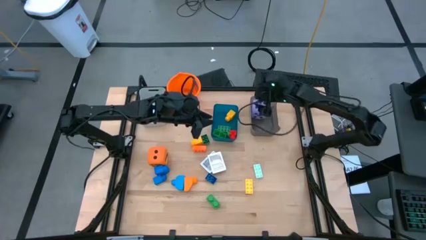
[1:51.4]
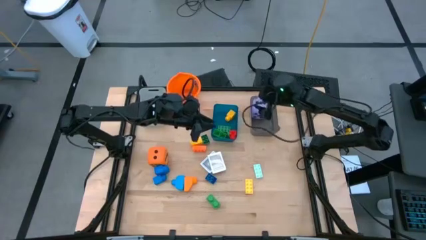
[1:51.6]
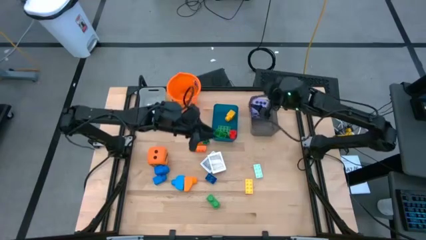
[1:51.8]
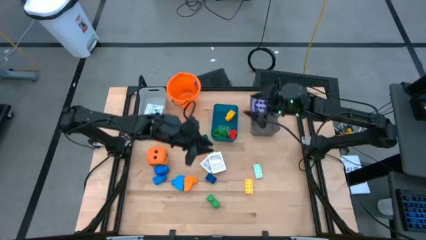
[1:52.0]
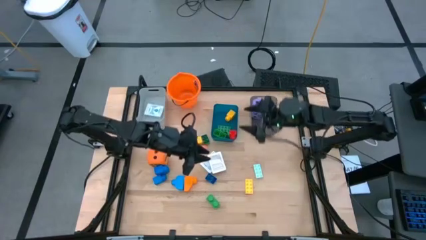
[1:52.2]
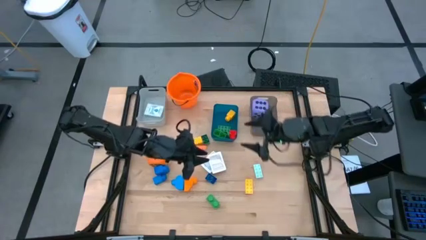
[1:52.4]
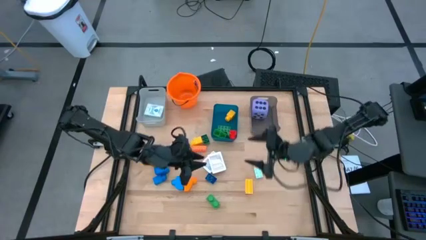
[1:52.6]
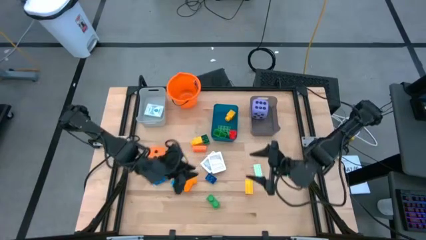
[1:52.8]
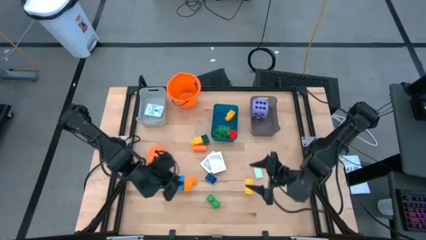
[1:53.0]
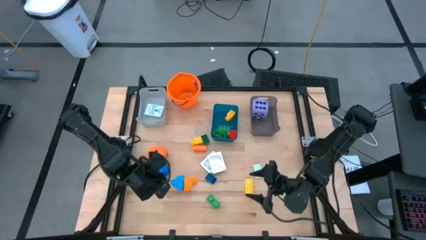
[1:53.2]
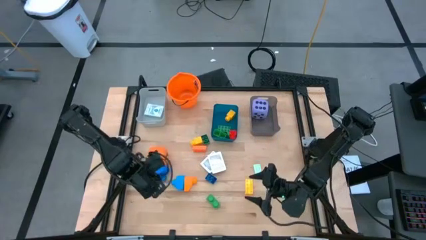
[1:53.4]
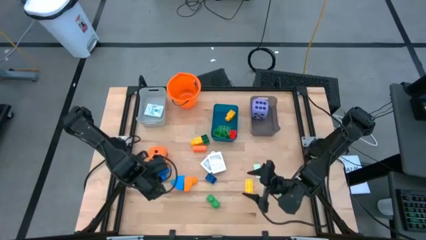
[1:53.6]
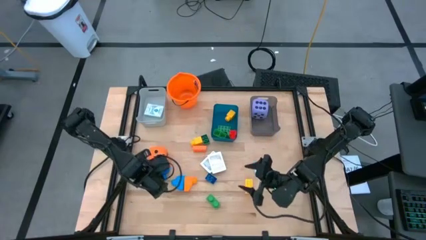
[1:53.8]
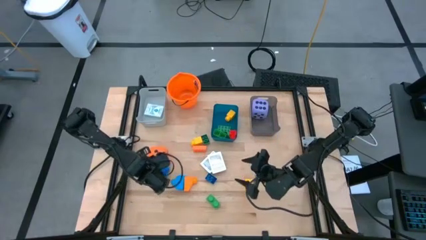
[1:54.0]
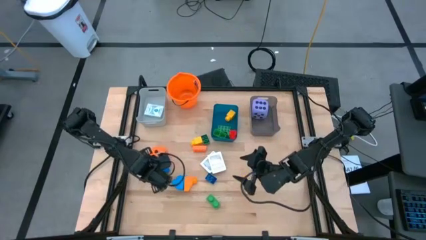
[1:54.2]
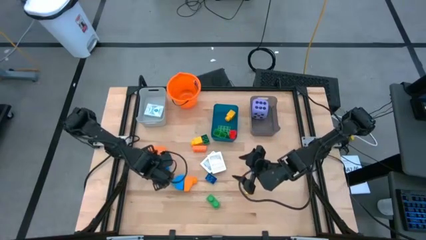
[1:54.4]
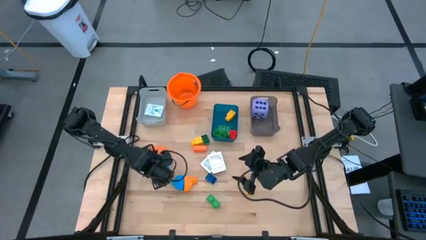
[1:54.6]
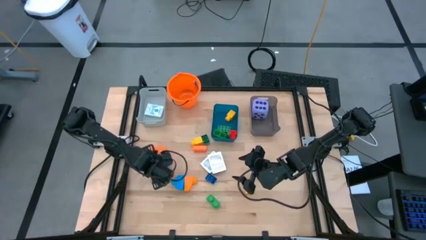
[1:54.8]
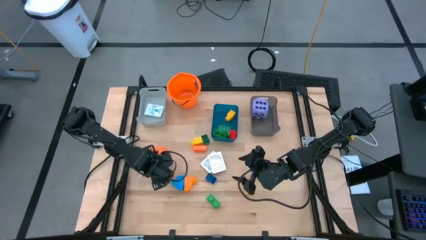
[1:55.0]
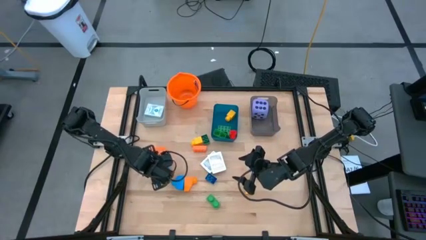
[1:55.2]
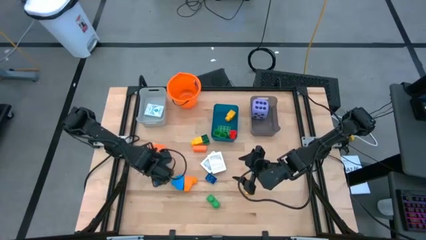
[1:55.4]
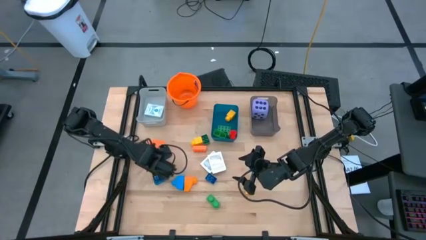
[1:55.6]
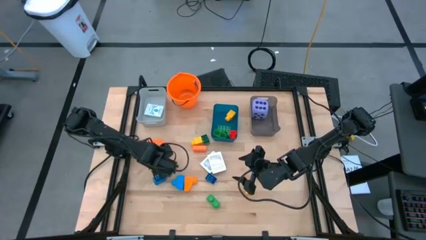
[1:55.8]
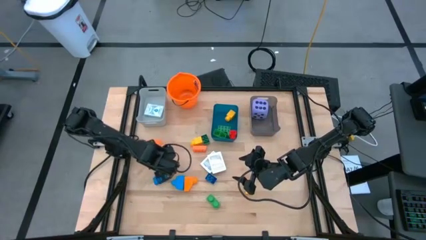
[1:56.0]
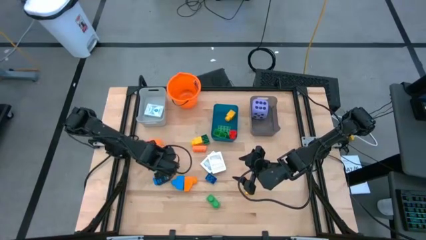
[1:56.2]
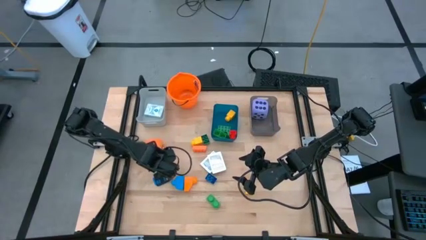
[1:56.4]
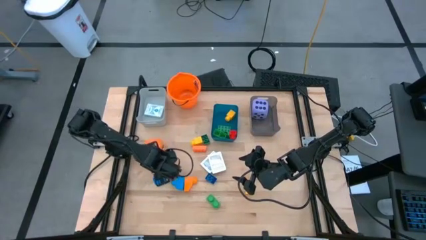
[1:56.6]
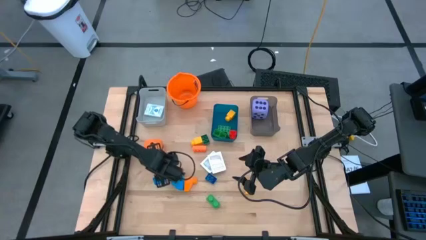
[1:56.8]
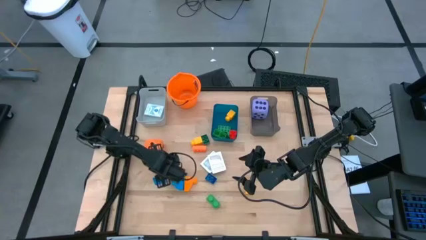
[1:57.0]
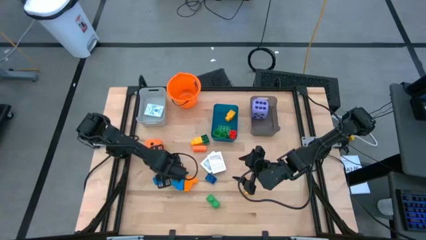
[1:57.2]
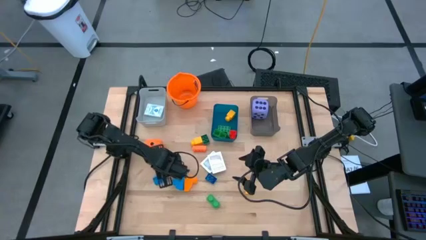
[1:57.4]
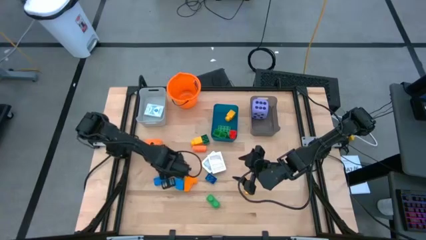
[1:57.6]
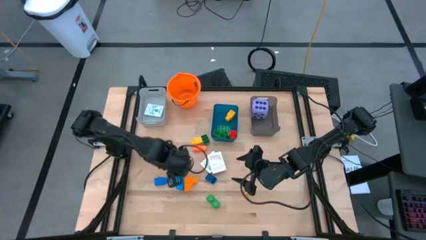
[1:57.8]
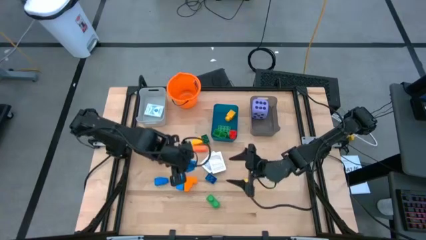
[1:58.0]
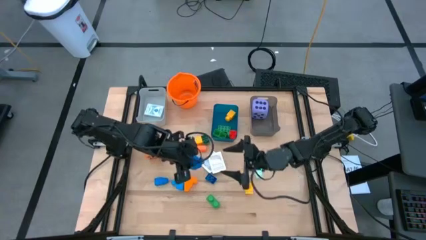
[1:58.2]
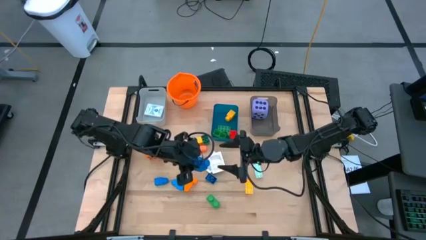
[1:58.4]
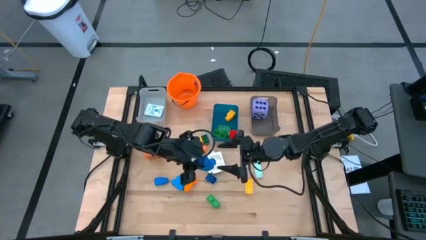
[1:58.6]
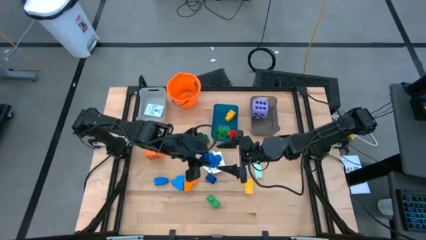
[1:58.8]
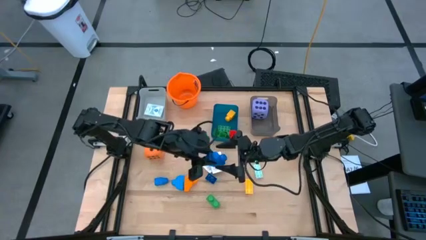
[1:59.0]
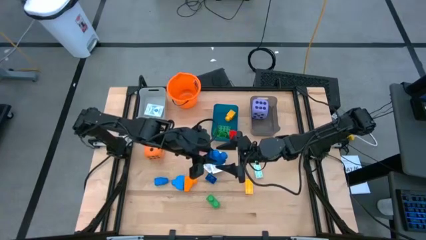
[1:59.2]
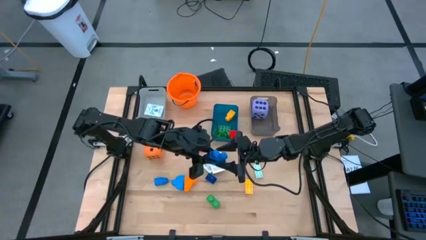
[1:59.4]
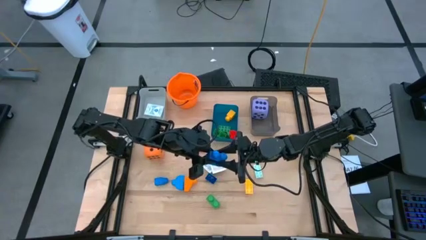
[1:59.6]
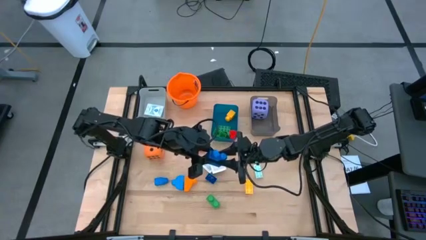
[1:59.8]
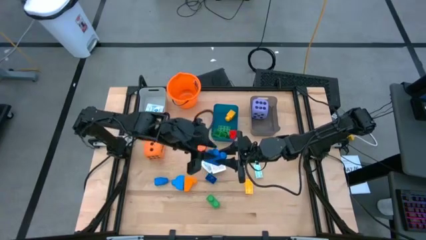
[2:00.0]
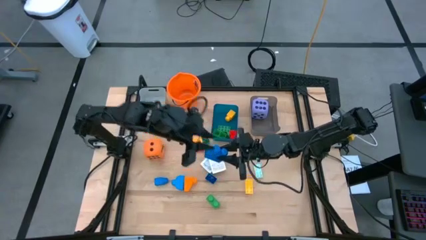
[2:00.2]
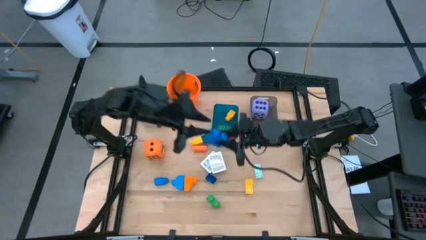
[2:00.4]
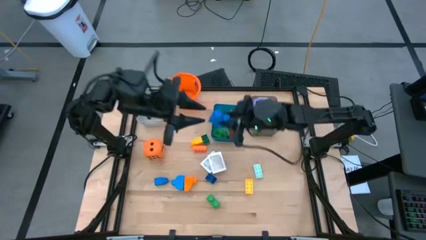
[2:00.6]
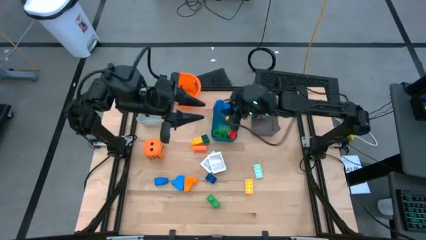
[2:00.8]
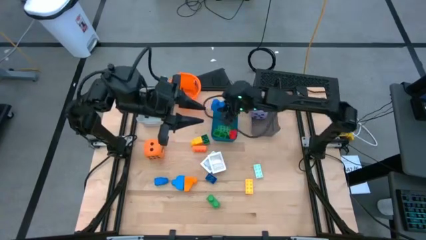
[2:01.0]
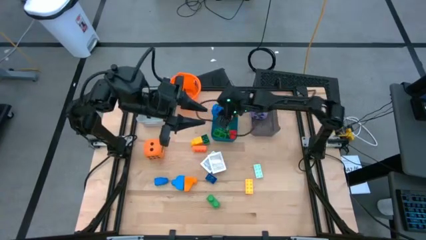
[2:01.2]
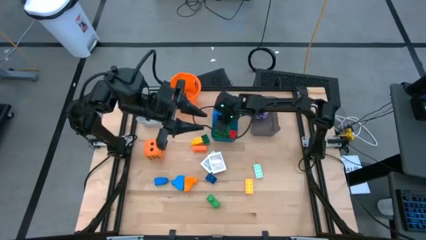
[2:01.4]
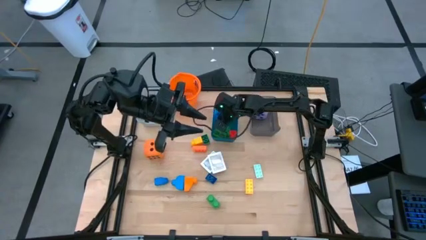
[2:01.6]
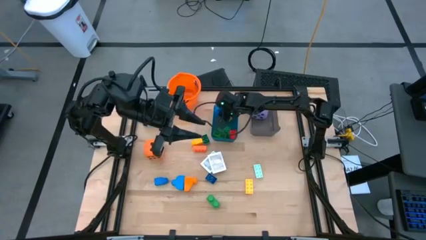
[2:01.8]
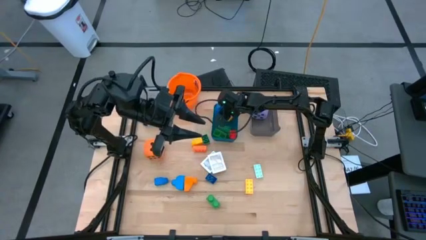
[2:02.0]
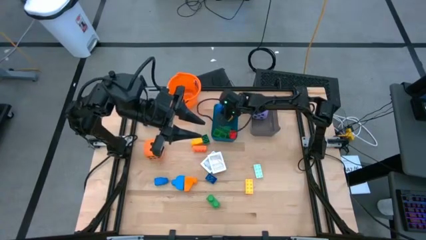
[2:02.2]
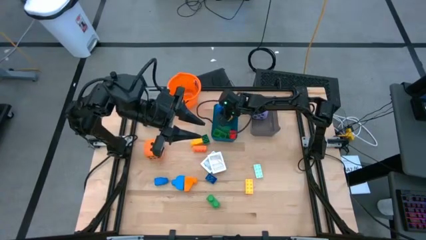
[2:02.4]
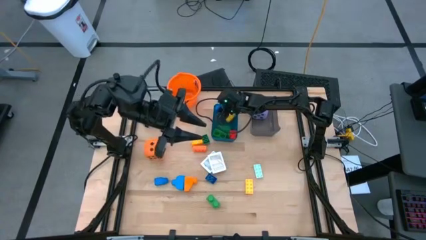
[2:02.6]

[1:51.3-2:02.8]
Task: Pick & Place Toys
Put the blue game piece into the blue bin
